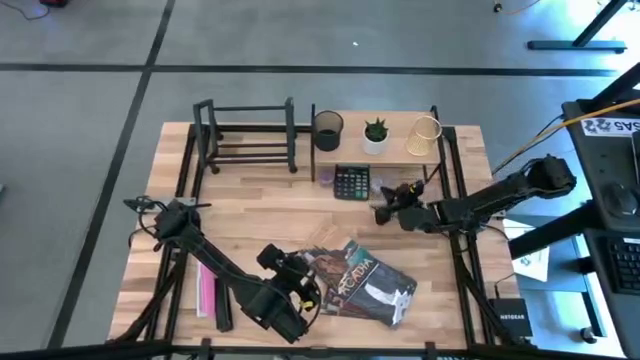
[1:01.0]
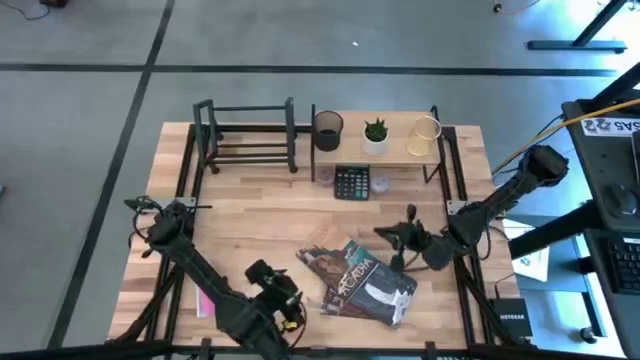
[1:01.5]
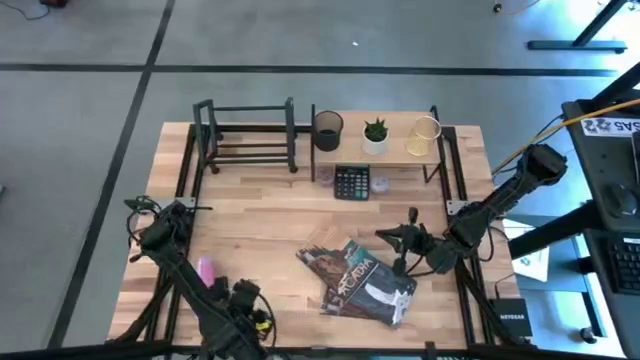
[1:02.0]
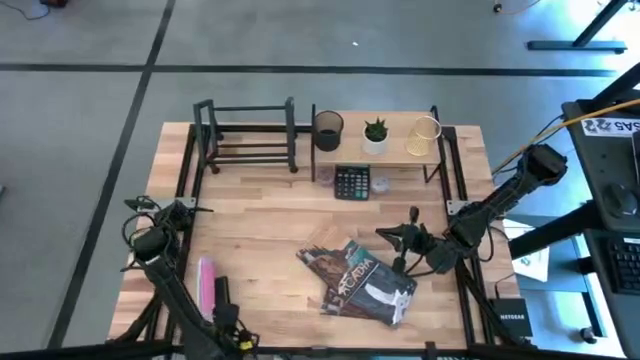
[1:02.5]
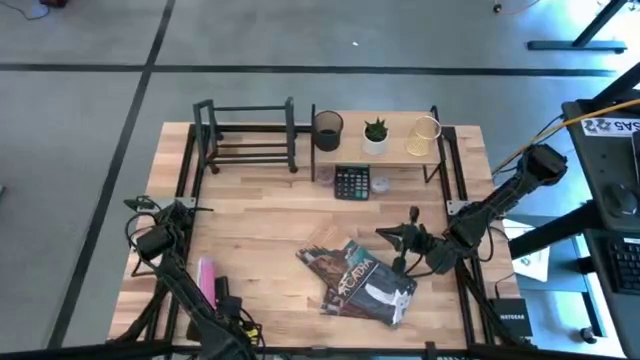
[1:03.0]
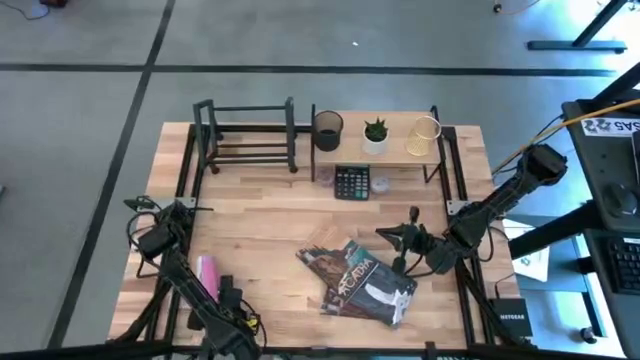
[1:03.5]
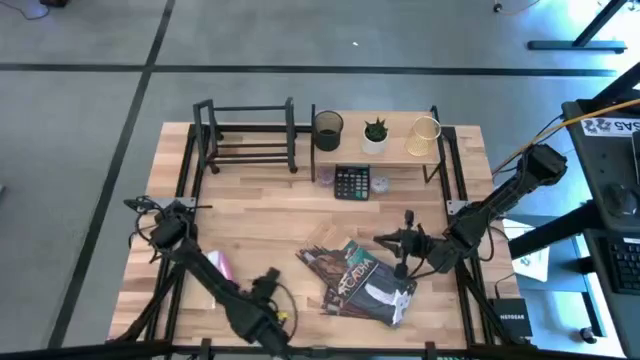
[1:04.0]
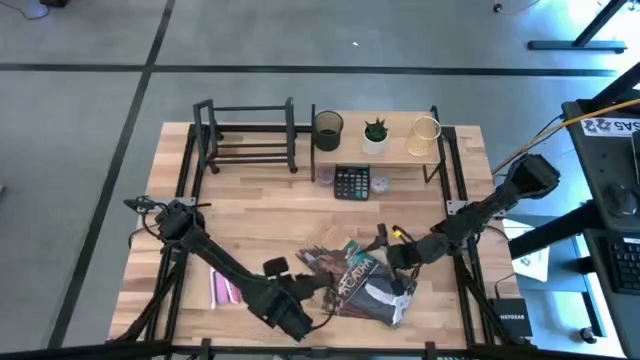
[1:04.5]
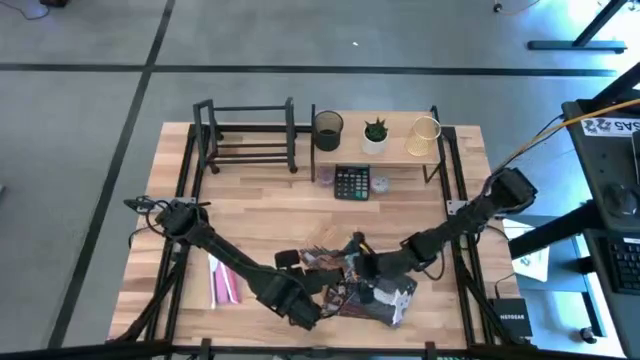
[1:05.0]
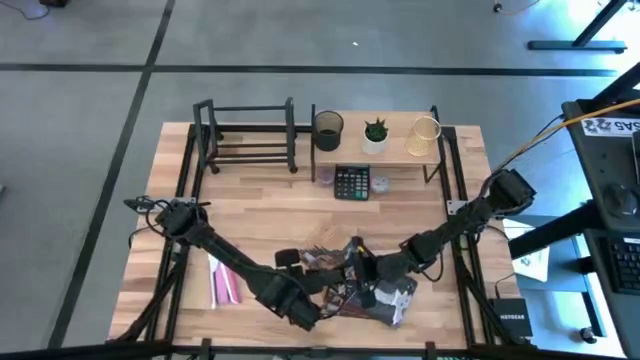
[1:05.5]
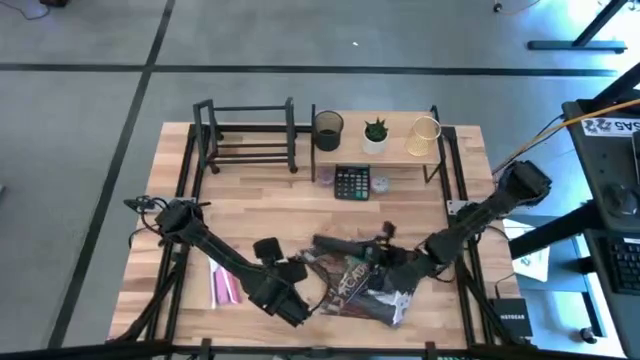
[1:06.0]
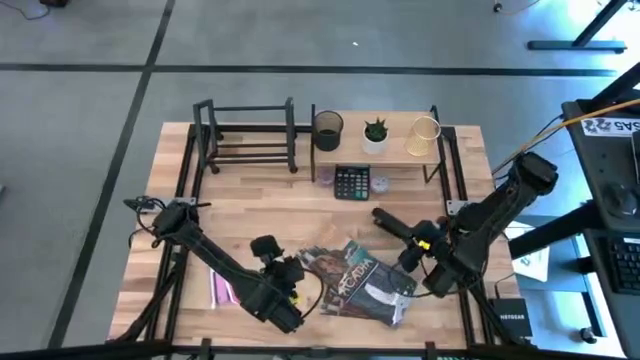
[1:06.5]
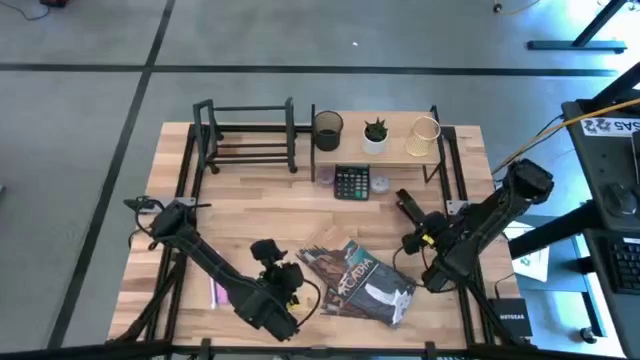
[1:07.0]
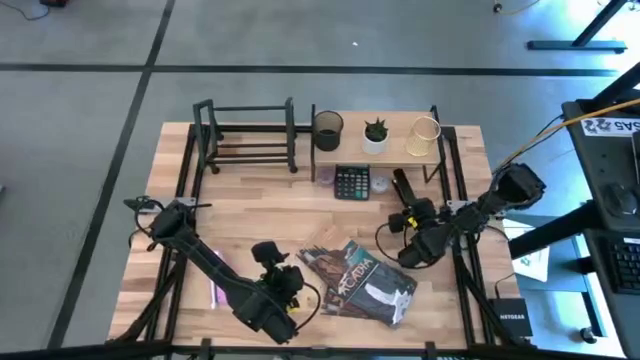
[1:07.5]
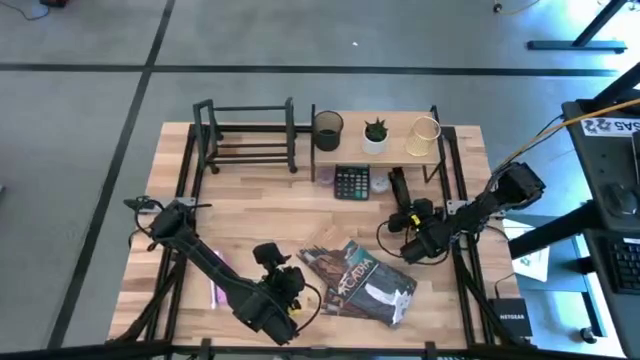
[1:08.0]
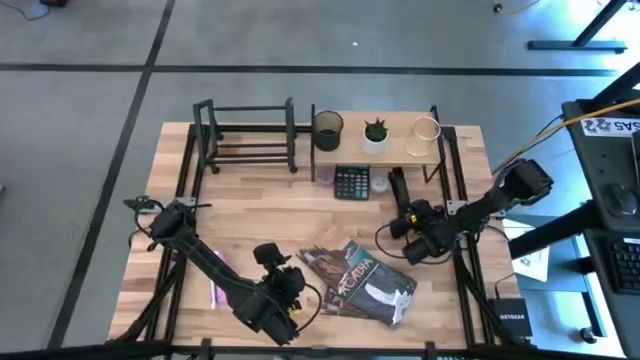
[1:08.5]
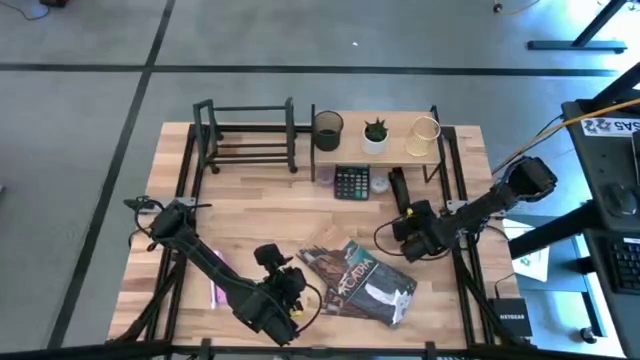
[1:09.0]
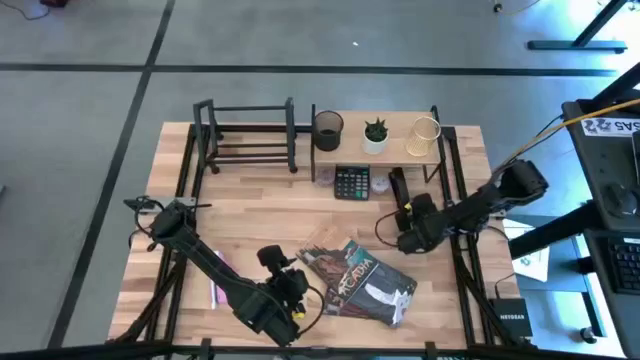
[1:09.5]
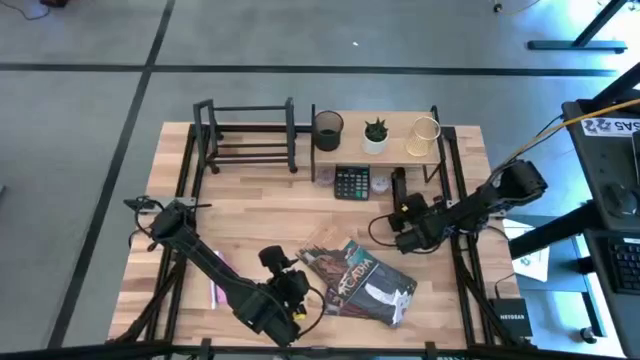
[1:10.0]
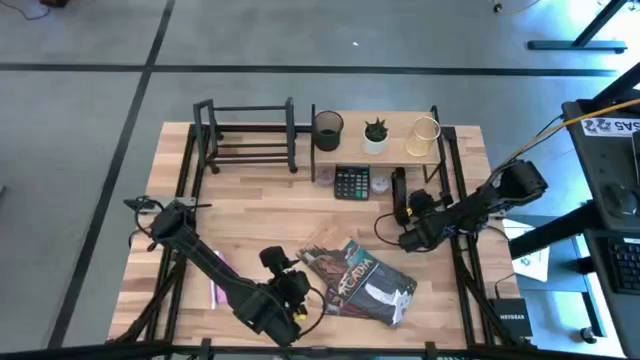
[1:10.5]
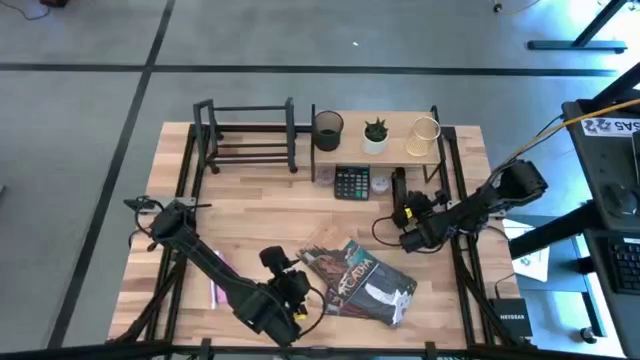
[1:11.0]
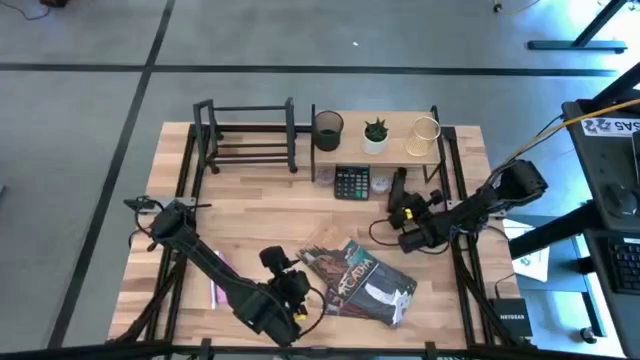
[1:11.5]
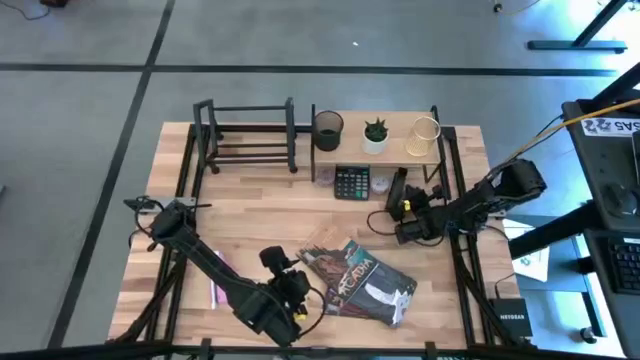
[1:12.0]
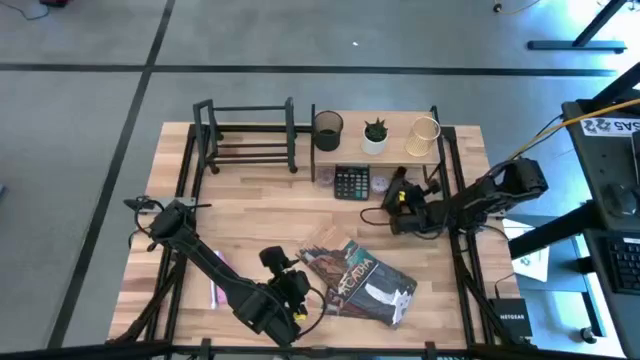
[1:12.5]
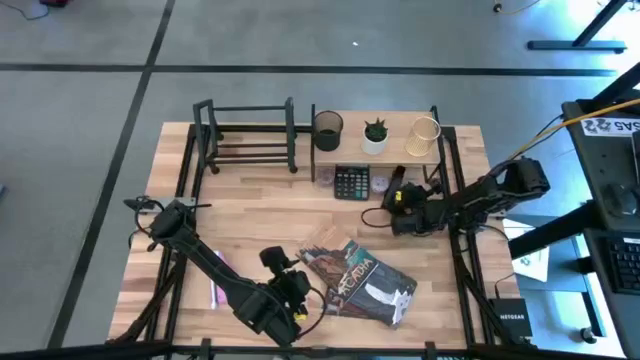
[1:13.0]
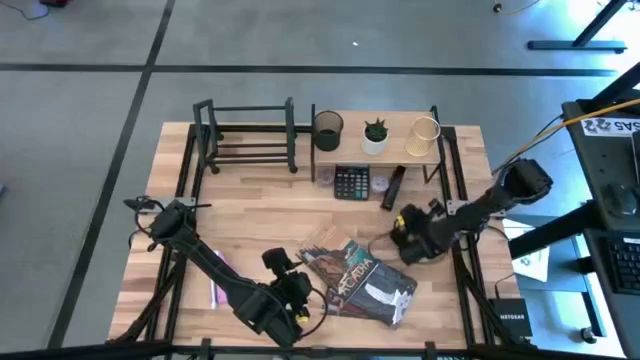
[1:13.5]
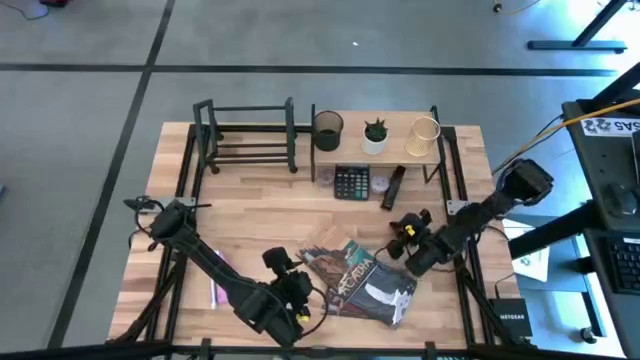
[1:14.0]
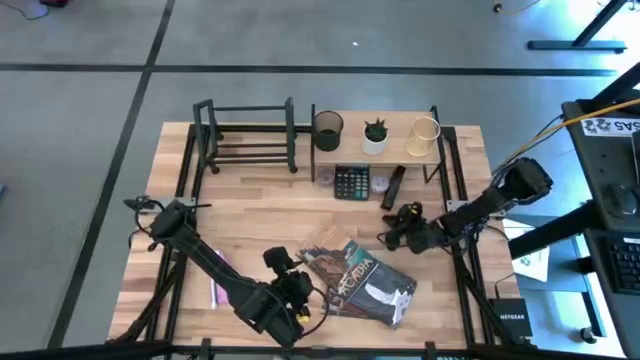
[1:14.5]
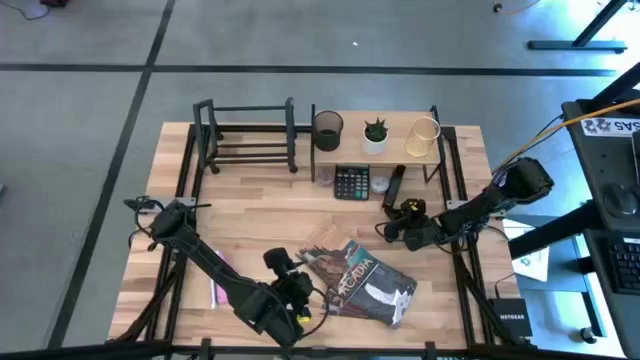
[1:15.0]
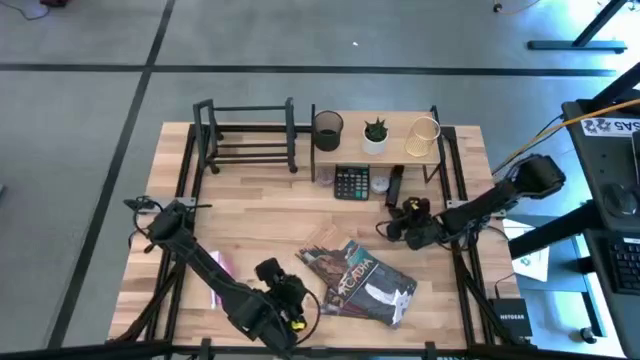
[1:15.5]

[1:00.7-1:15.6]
Task: Stock shelves
Put the black stapler under the shelf

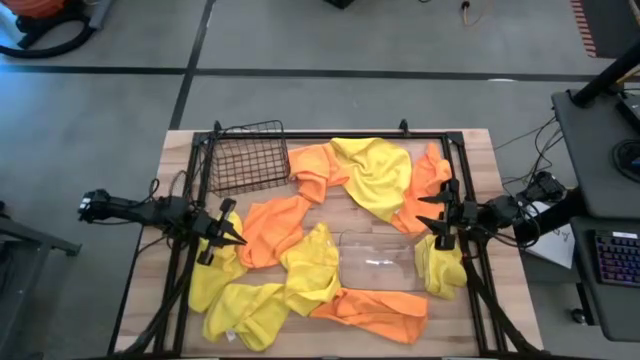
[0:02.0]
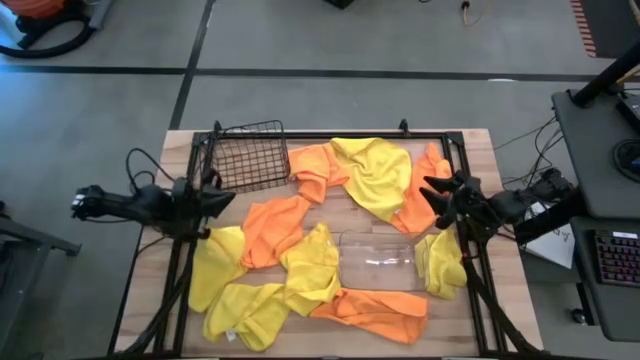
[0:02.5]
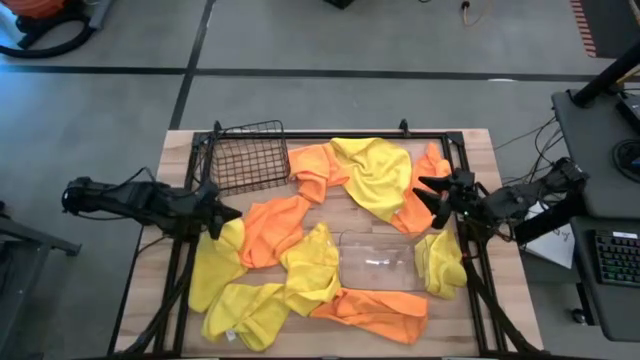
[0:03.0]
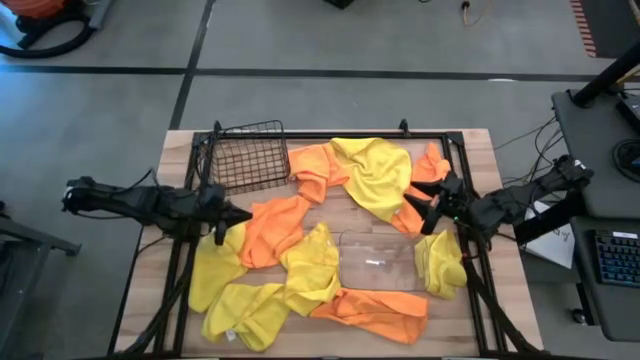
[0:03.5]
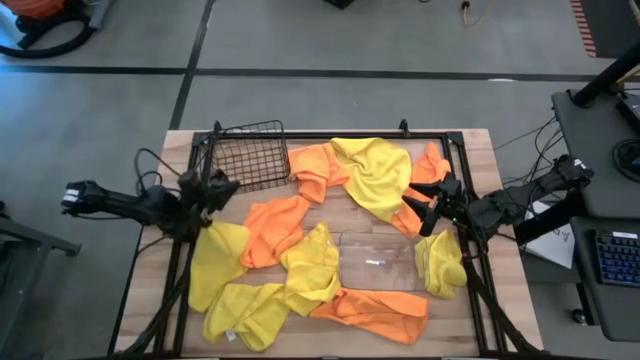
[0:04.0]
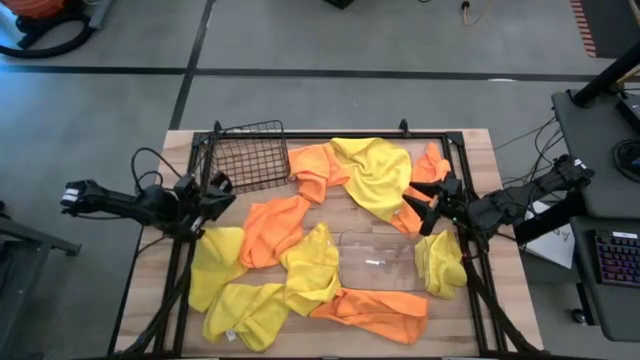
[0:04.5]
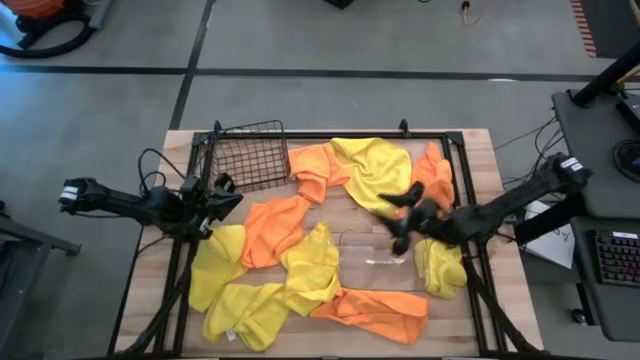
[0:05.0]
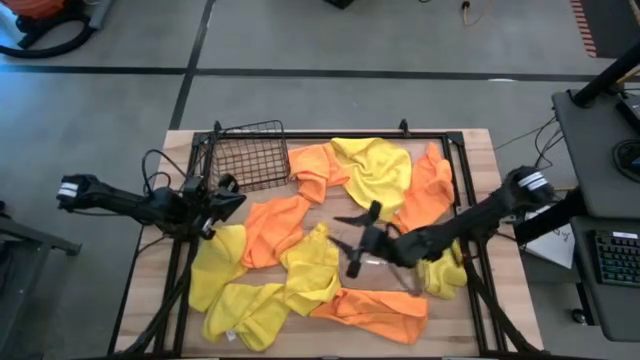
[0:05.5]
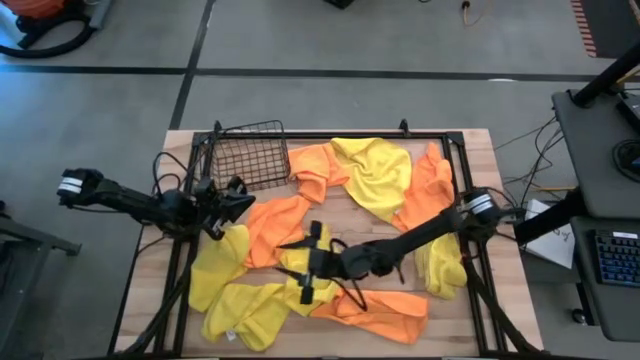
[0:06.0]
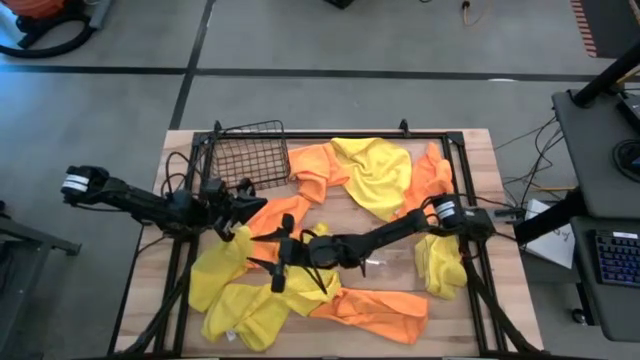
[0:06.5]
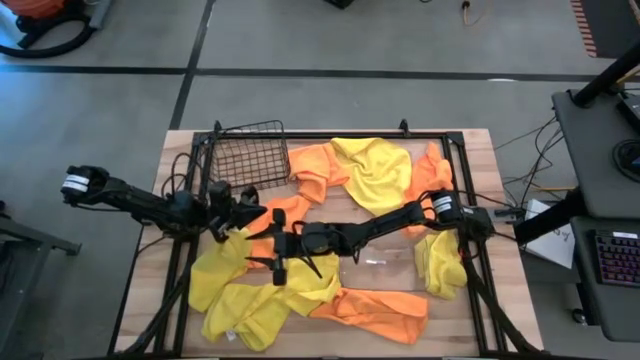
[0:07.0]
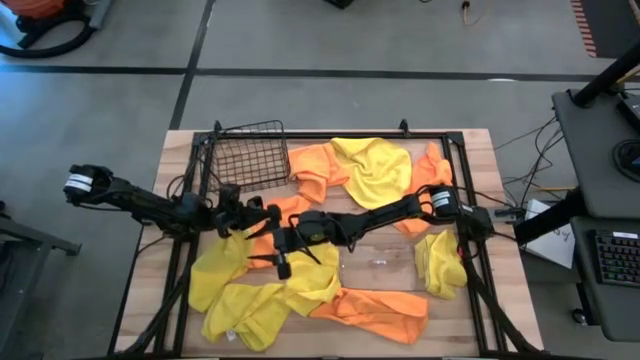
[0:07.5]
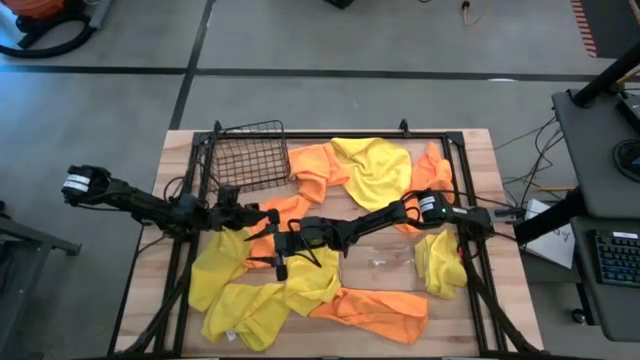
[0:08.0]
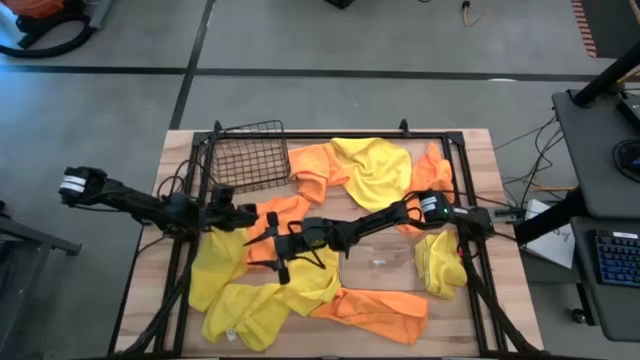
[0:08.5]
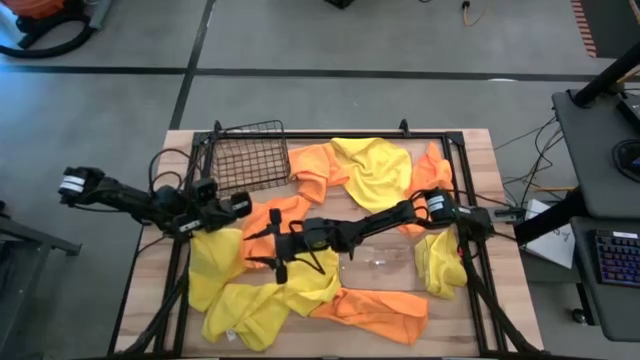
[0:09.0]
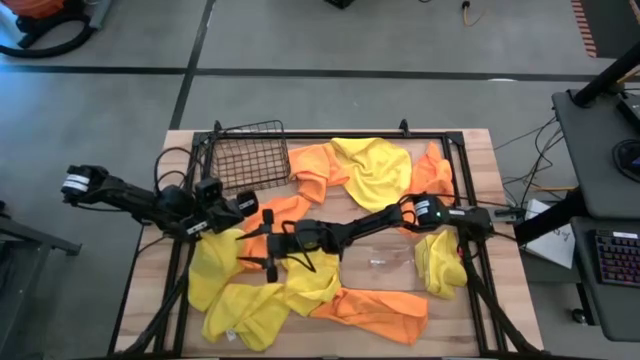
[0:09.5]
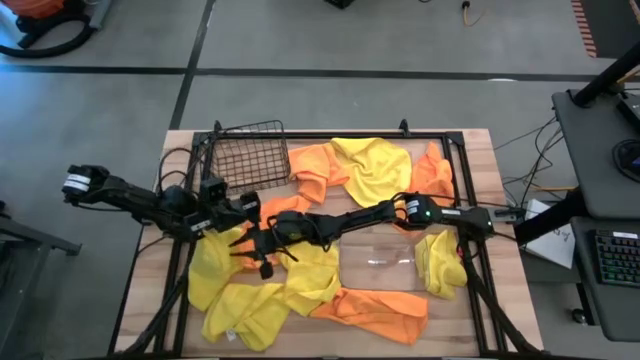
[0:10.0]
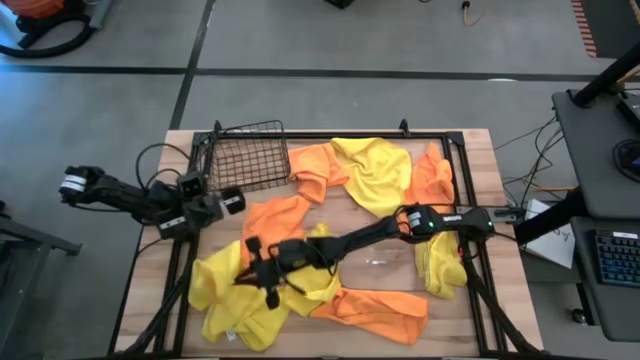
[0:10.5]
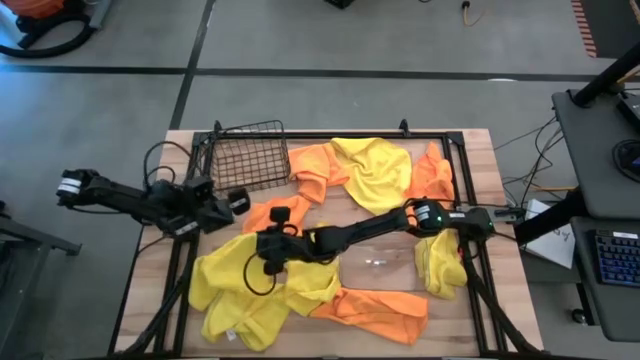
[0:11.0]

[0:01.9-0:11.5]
Task: Sort microfiber towel by color & place in baskets
Put the yellow towel into the transparent bin
